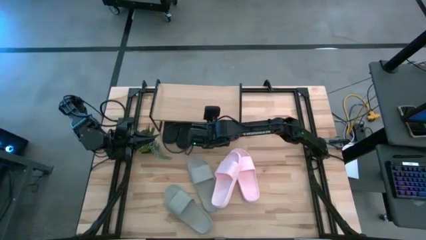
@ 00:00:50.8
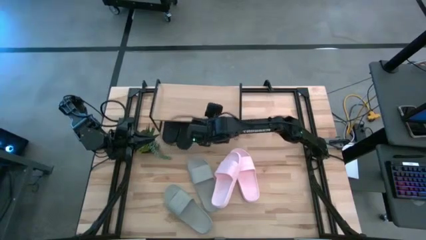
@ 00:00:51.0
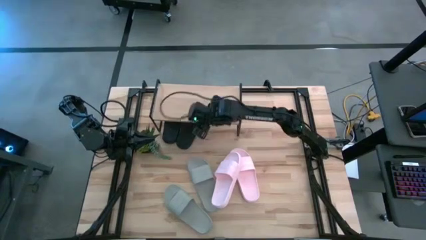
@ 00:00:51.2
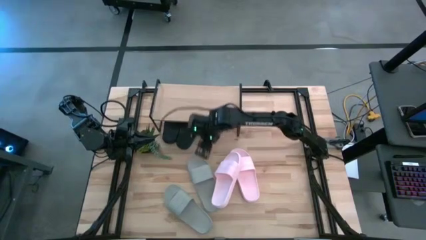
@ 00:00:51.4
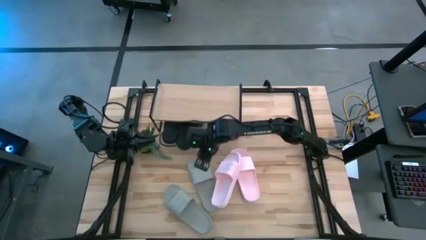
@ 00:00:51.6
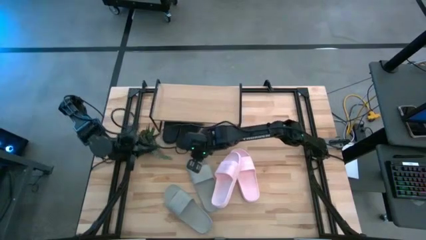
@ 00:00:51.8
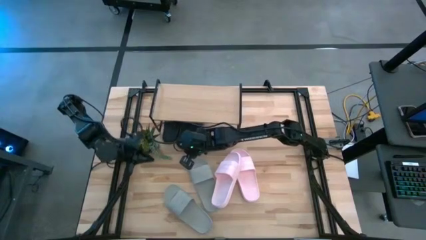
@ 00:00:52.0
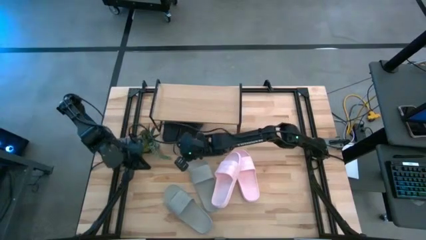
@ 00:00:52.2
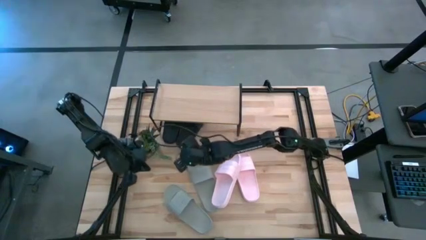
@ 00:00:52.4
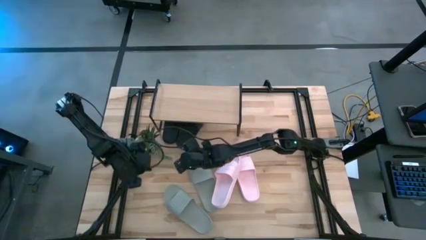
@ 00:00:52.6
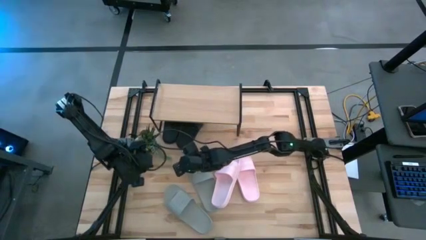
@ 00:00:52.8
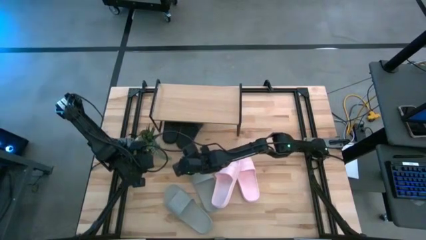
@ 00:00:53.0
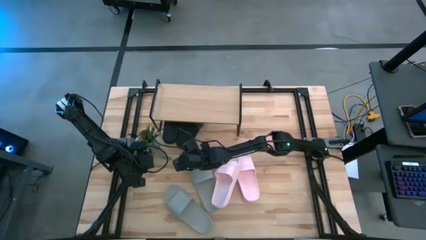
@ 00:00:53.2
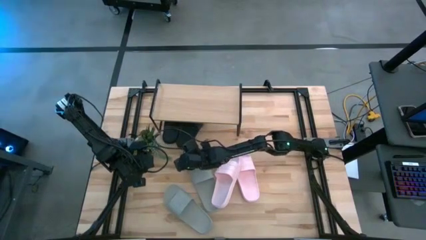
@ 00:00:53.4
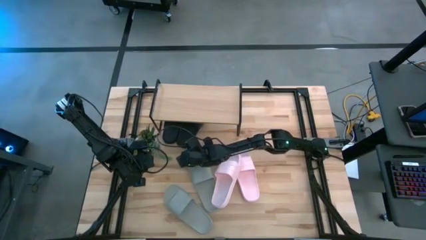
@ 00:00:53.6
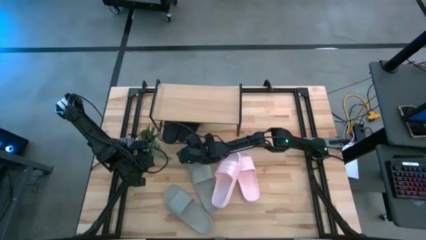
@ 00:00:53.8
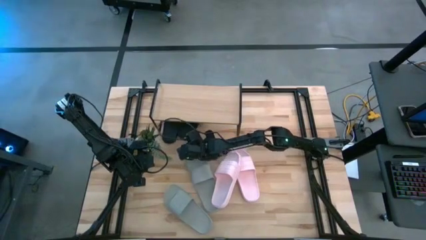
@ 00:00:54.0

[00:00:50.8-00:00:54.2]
Task: Pick and place slides into the shelf
Adjust the black slide

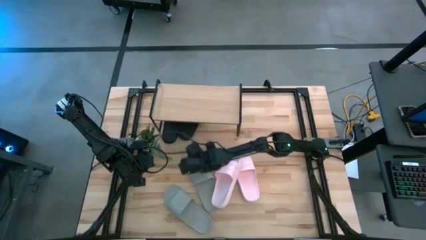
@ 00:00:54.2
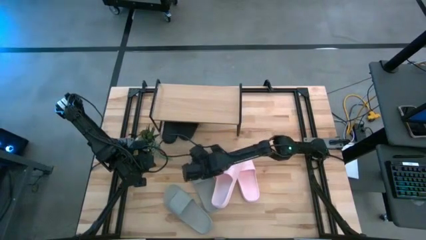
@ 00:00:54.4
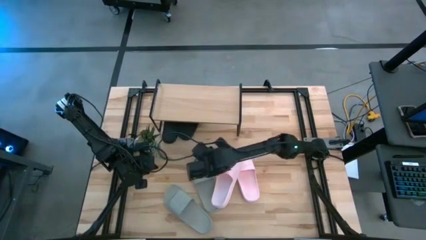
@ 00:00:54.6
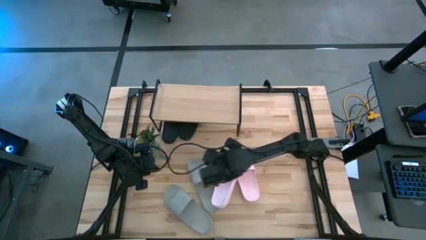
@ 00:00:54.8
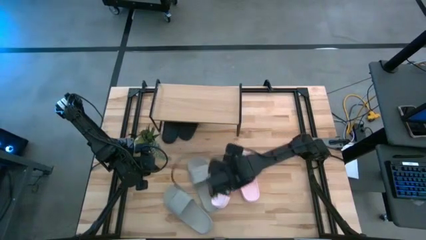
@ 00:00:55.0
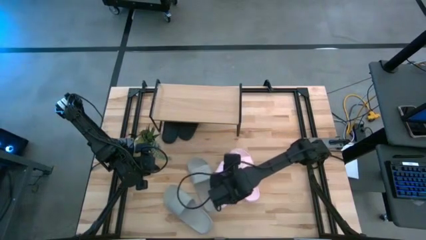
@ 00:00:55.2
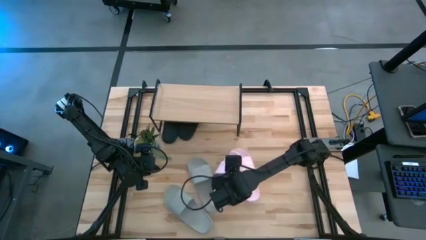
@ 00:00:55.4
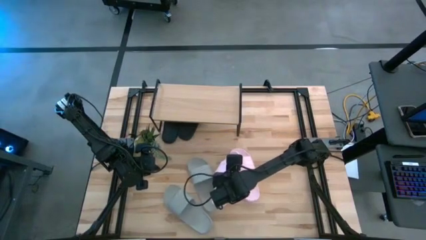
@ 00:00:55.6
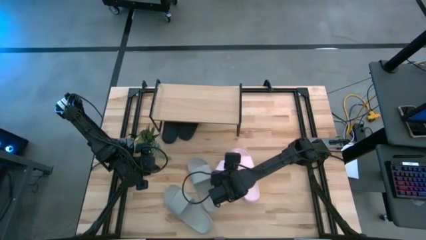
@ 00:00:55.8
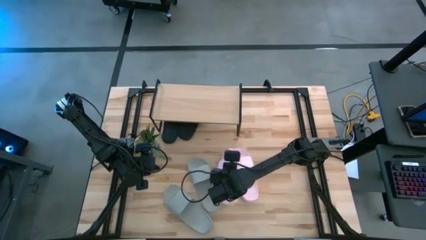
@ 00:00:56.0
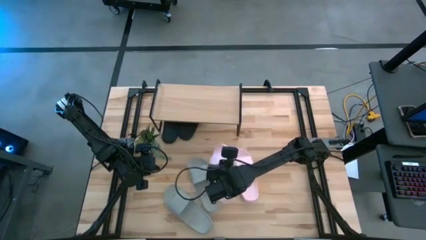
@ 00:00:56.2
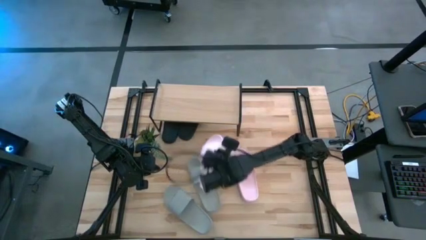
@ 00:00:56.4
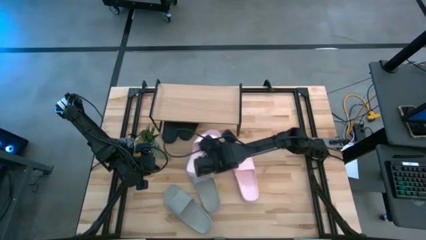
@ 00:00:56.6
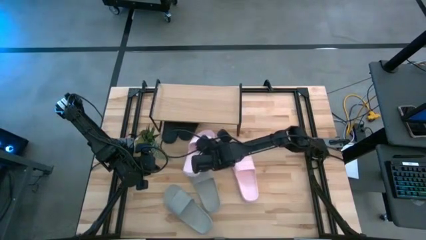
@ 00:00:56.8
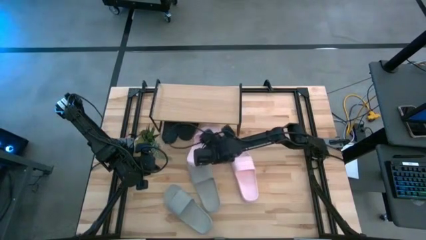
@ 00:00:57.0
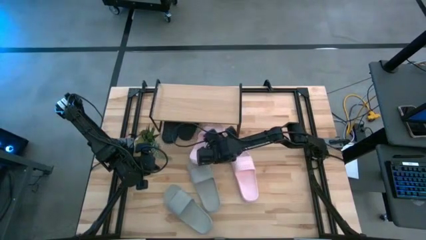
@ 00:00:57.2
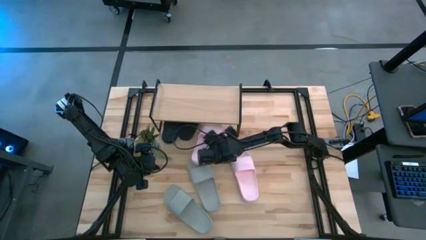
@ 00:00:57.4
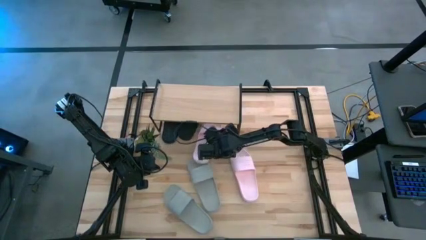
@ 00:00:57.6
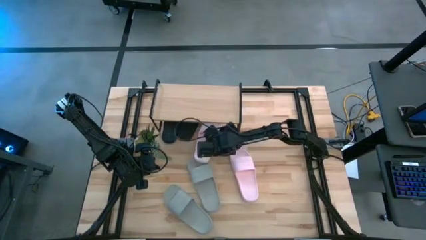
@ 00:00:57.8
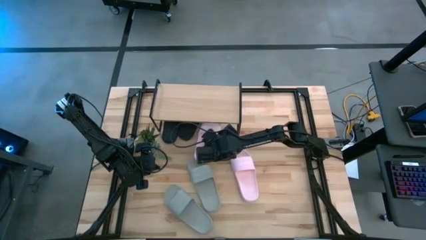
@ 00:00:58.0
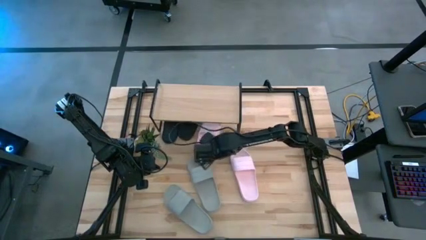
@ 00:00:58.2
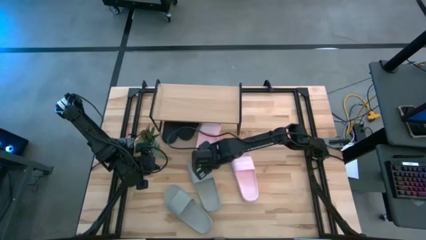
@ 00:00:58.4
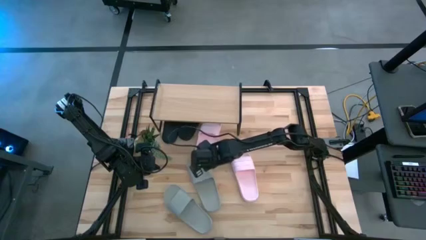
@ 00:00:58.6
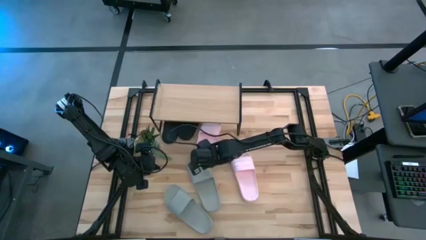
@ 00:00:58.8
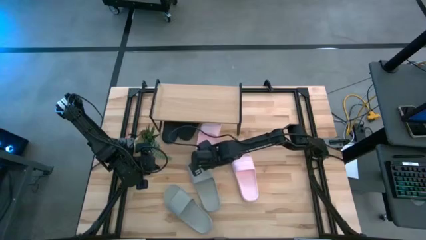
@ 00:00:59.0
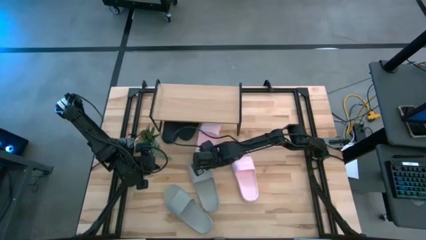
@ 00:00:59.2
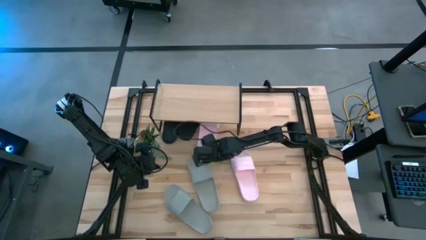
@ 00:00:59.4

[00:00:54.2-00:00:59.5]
Move the left pink slide under the shelf

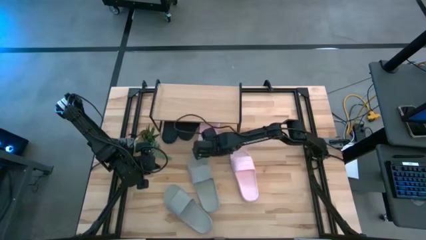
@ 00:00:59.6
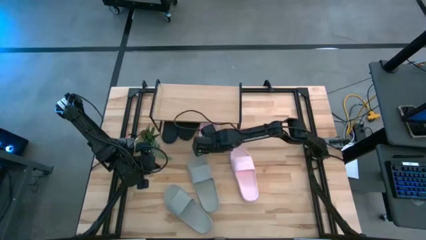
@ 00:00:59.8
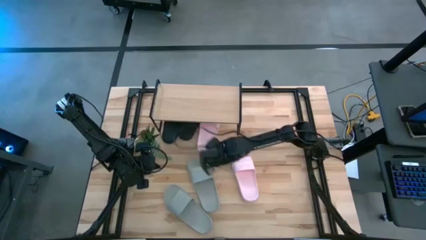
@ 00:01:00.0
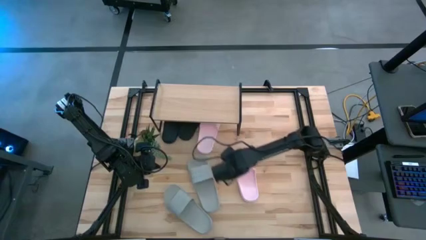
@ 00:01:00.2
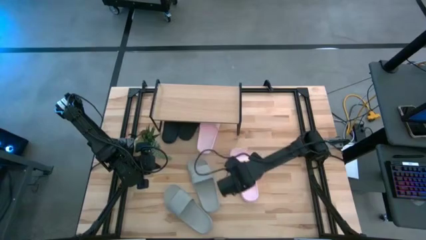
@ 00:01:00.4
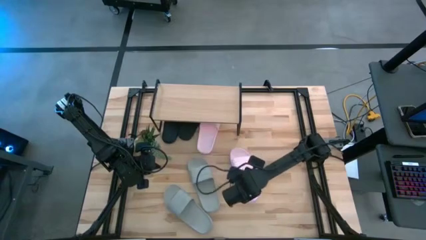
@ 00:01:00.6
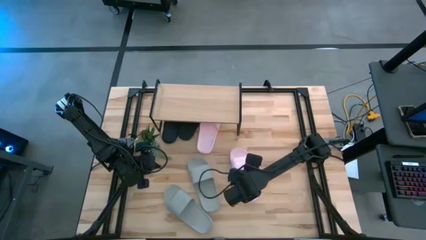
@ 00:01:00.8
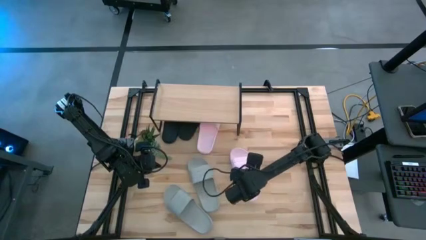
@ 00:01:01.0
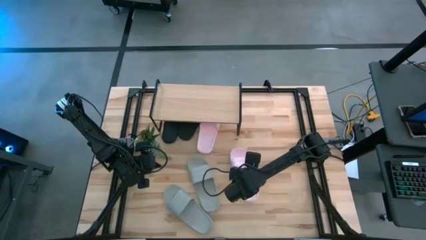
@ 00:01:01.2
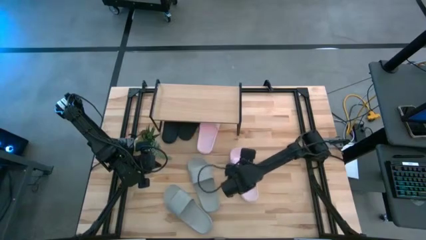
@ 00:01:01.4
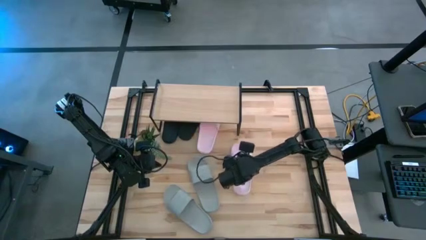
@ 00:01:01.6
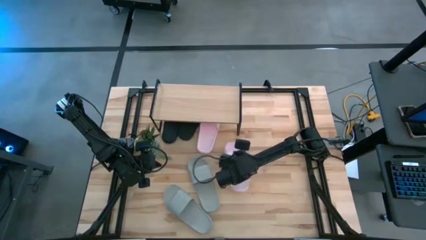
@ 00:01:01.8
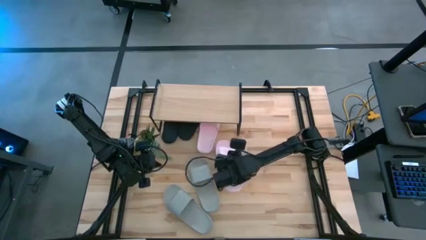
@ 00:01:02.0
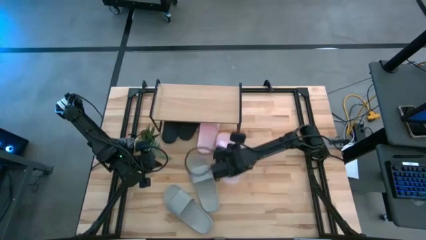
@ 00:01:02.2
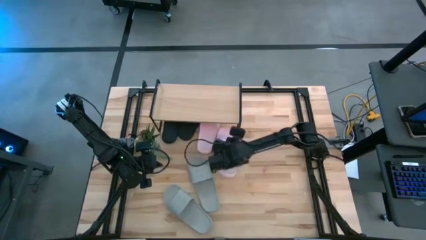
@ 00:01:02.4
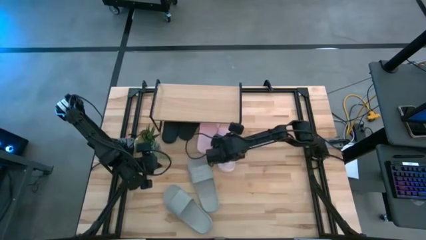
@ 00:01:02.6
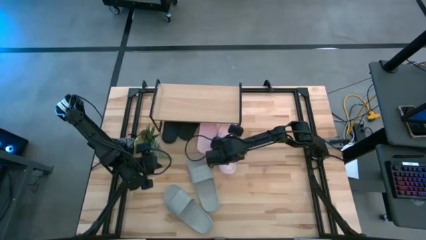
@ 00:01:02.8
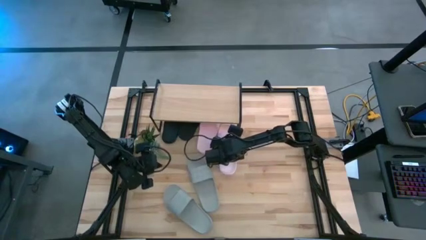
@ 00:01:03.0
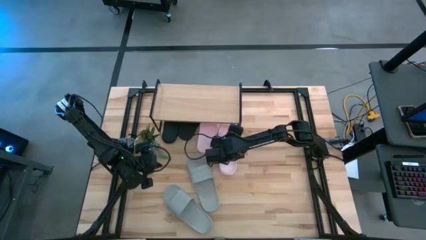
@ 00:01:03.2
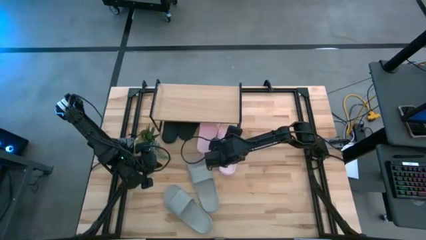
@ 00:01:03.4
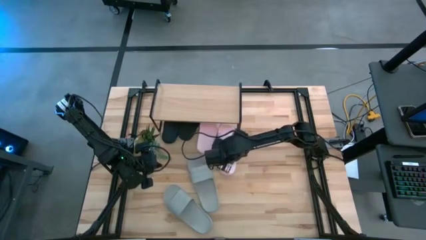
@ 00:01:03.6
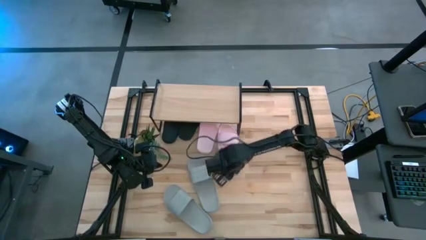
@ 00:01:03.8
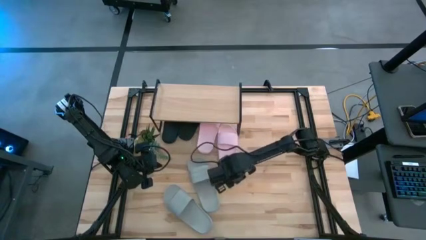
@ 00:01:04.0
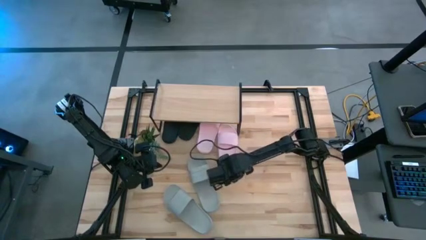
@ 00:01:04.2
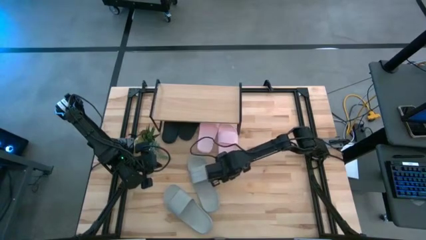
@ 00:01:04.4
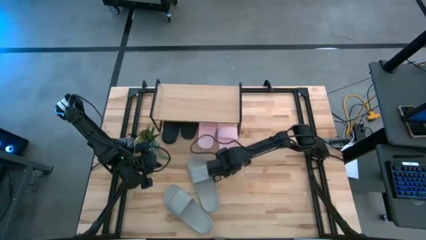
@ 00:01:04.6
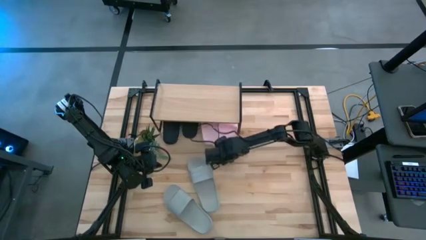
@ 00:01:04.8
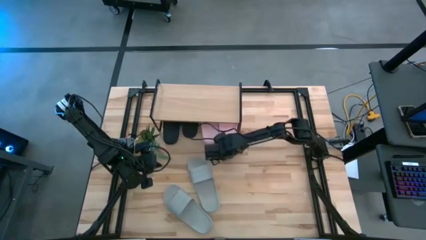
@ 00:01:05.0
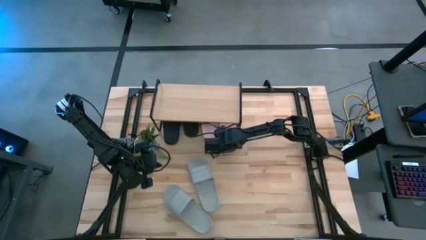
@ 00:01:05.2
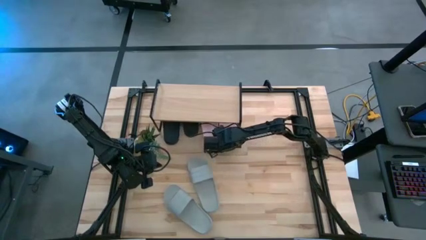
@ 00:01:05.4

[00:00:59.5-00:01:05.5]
Move the pink slide under the shelf

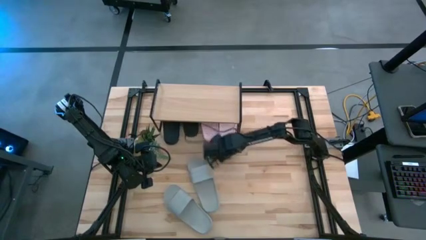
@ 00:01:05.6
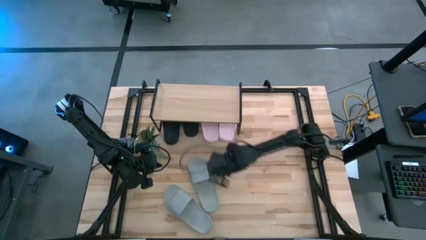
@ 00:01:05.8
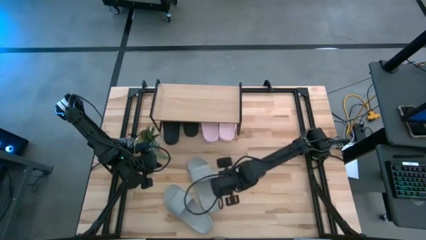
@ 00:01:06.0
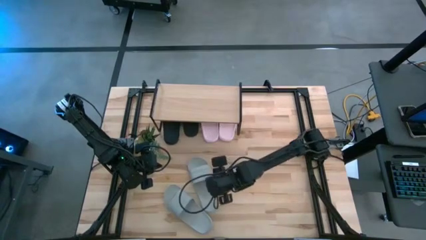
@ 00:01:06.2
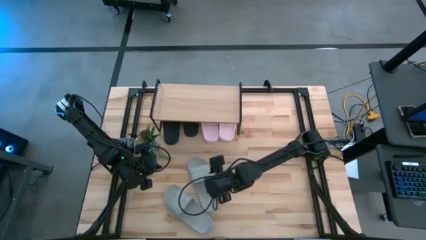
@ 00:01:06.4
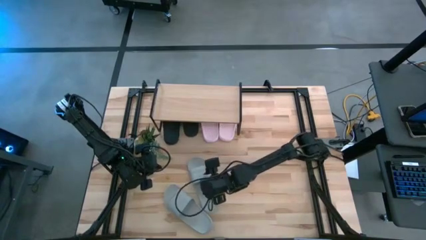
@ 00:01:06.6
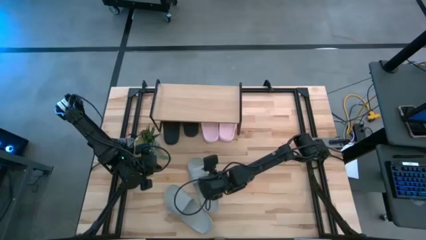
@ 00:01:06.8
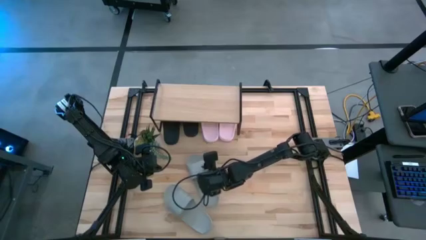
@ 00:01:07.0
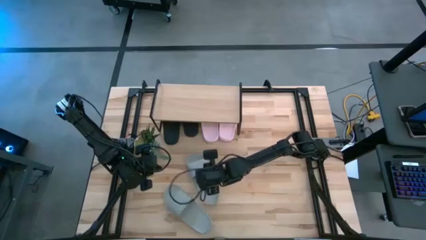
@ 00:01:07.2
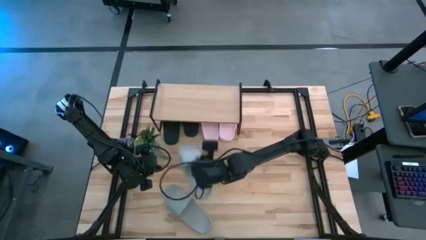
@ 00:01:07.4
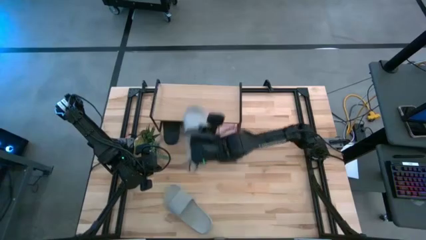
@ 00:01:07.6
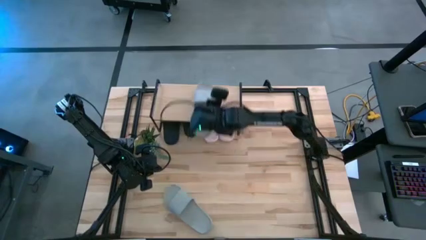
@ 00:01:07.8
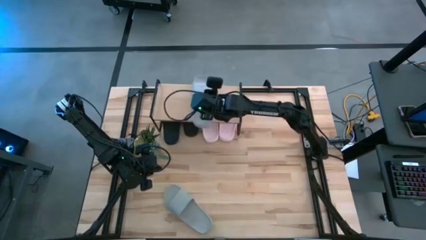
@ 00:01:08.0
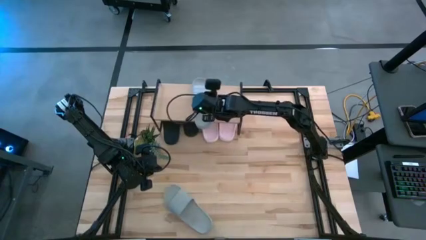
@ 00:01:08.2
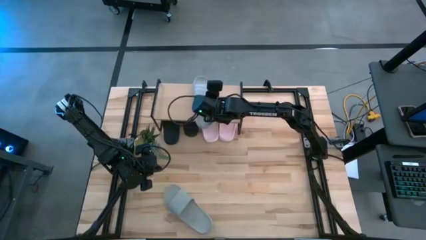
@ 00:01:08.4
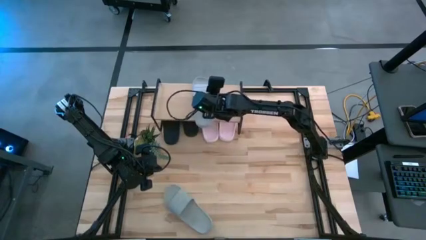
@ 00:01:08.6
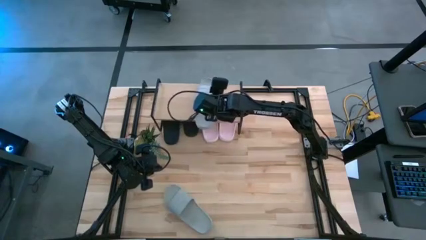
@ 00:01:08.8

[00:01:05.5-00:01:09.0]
Put the right gray slide on the shelf
